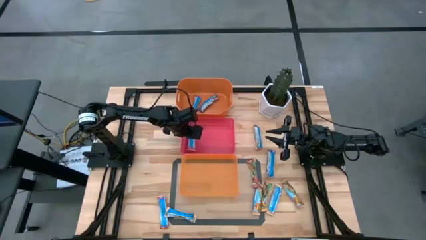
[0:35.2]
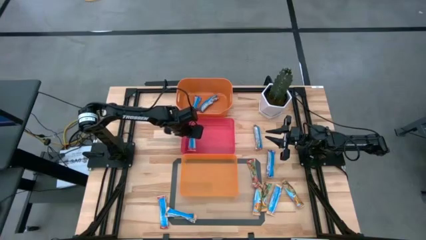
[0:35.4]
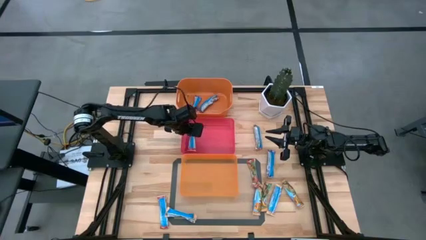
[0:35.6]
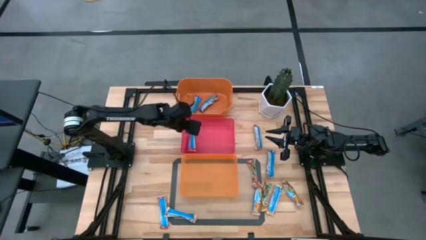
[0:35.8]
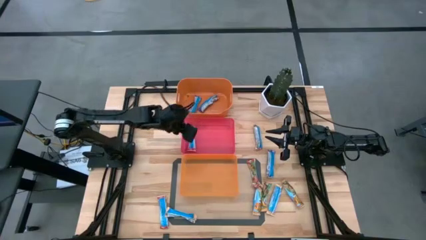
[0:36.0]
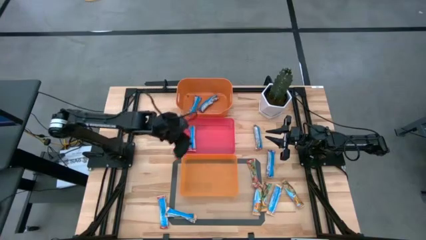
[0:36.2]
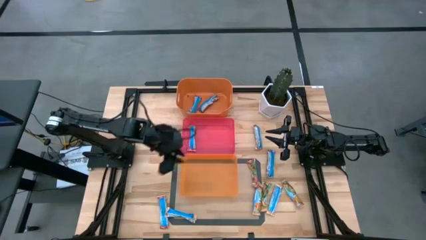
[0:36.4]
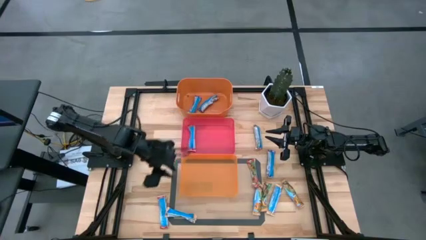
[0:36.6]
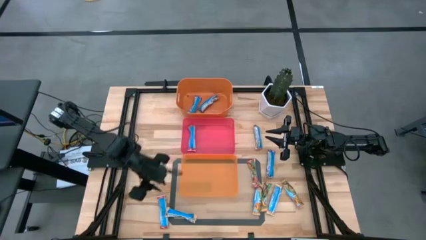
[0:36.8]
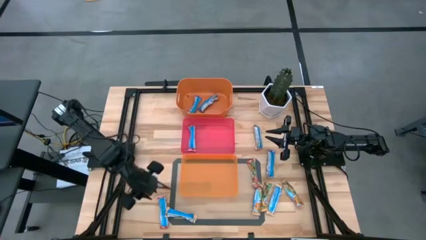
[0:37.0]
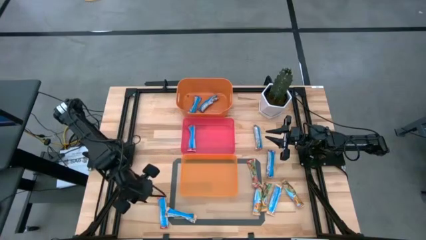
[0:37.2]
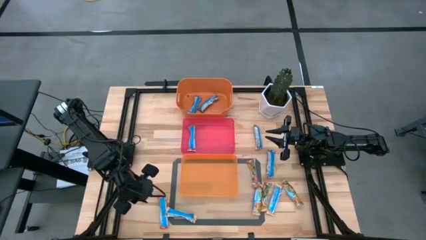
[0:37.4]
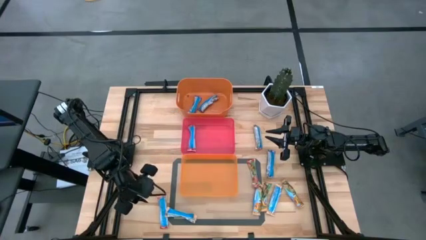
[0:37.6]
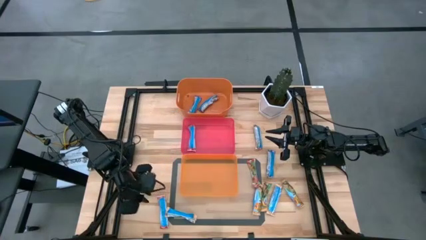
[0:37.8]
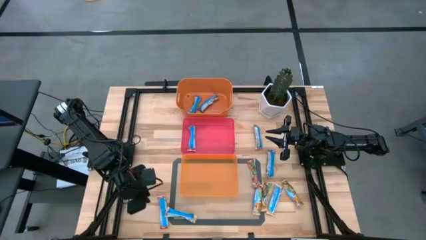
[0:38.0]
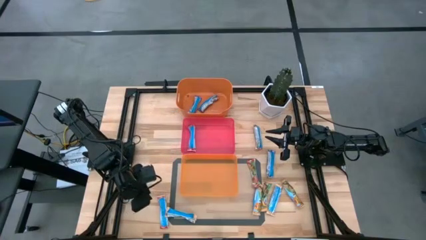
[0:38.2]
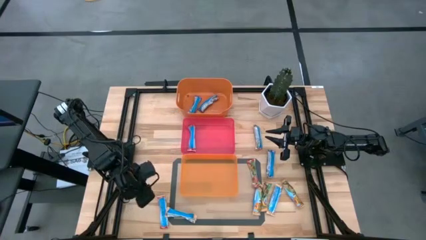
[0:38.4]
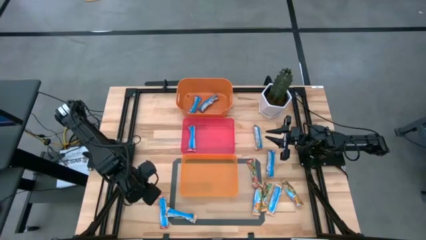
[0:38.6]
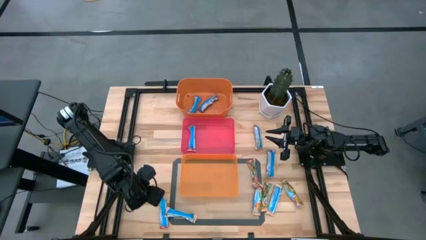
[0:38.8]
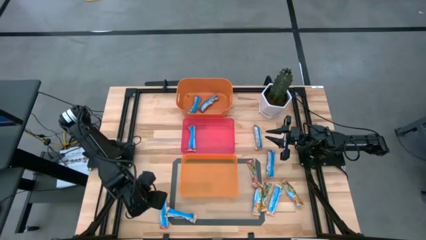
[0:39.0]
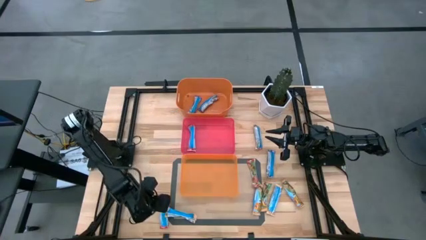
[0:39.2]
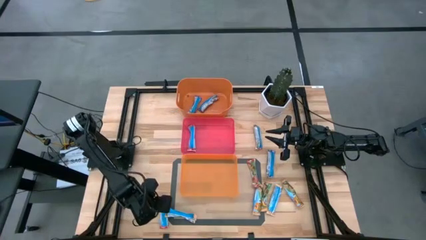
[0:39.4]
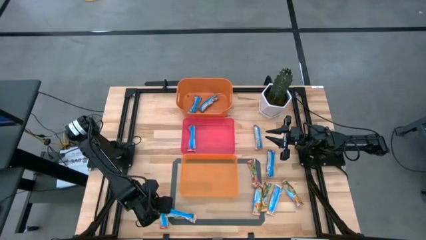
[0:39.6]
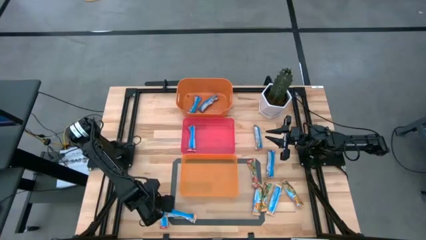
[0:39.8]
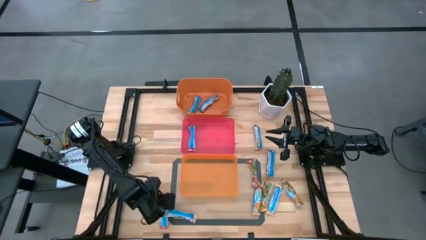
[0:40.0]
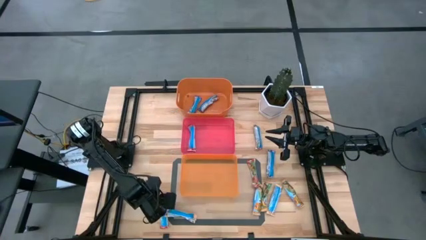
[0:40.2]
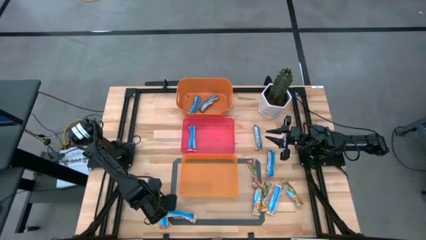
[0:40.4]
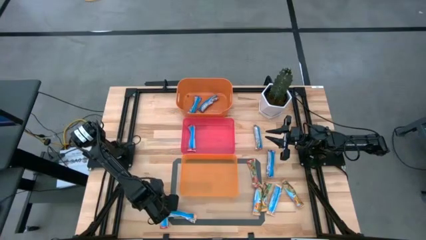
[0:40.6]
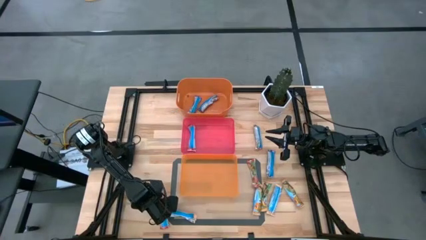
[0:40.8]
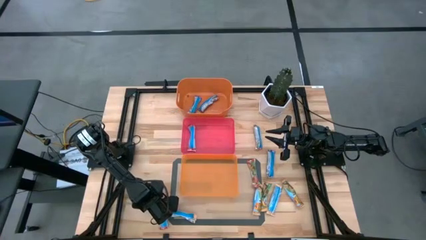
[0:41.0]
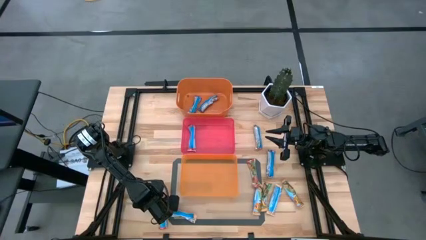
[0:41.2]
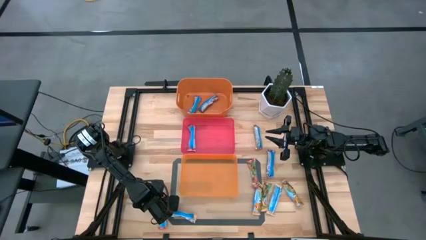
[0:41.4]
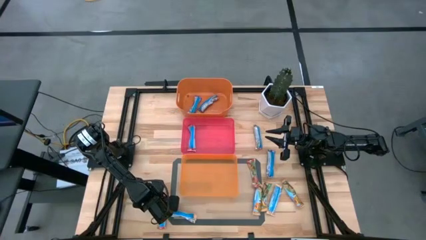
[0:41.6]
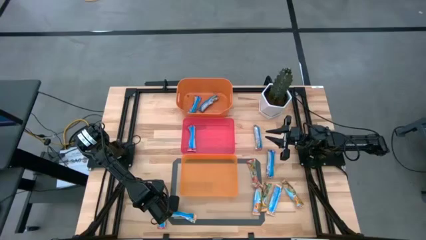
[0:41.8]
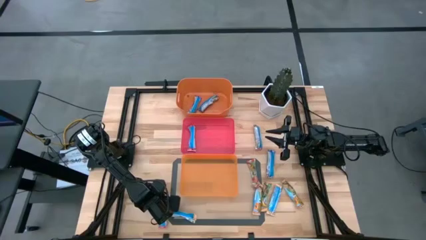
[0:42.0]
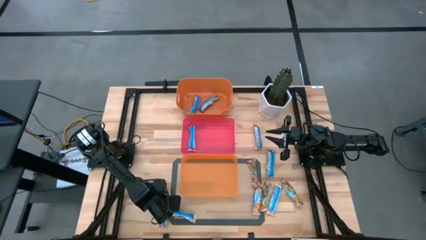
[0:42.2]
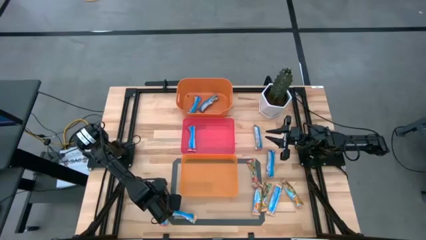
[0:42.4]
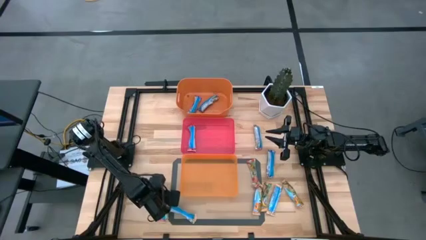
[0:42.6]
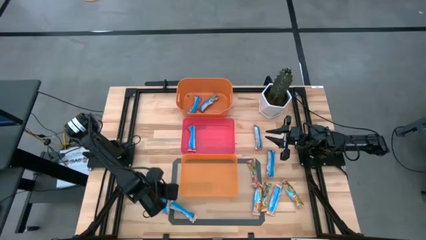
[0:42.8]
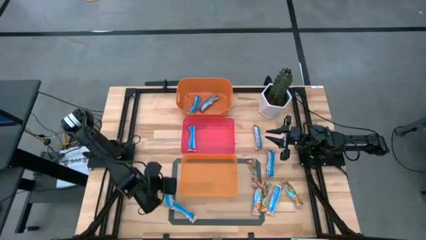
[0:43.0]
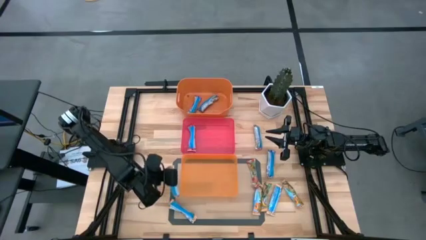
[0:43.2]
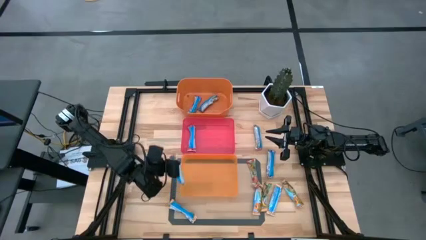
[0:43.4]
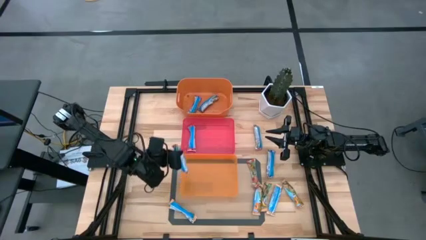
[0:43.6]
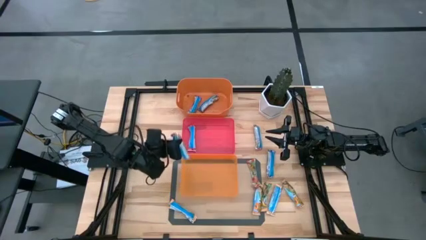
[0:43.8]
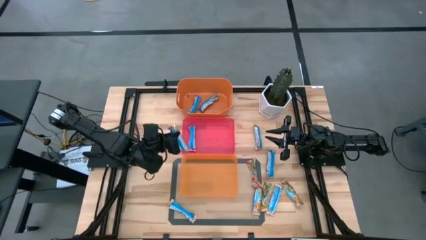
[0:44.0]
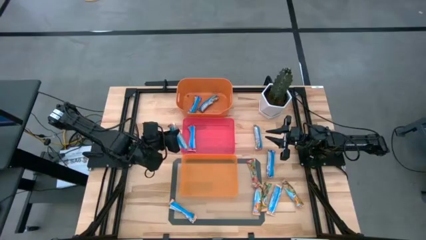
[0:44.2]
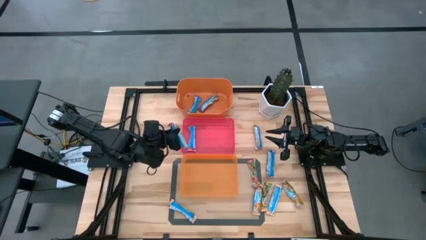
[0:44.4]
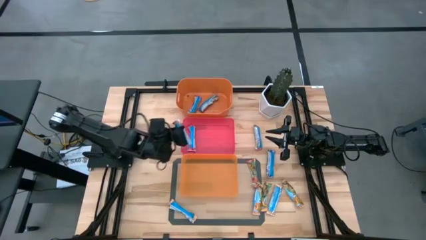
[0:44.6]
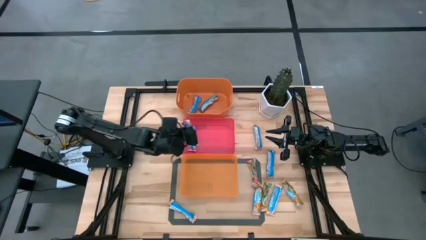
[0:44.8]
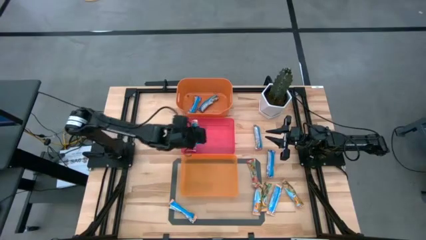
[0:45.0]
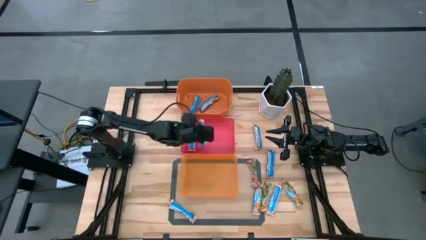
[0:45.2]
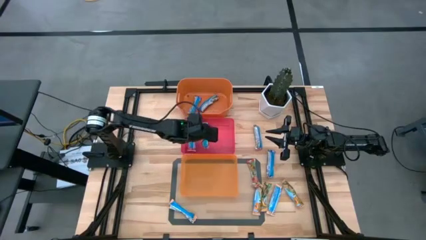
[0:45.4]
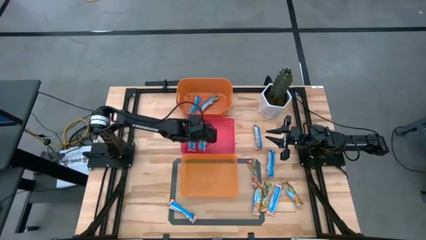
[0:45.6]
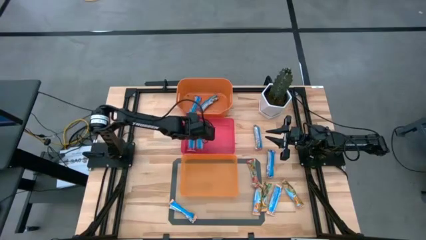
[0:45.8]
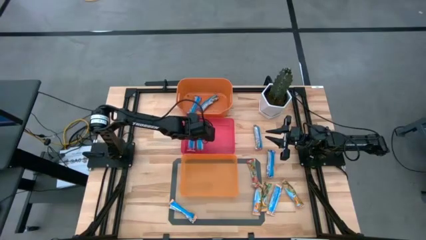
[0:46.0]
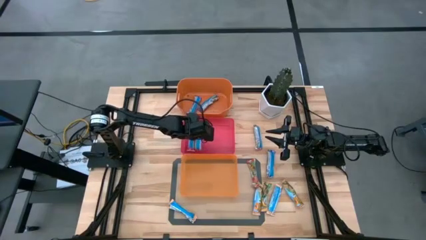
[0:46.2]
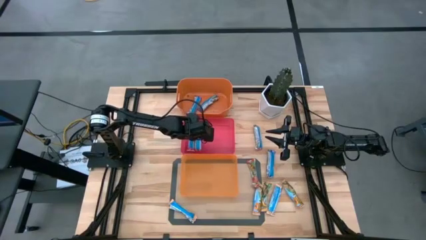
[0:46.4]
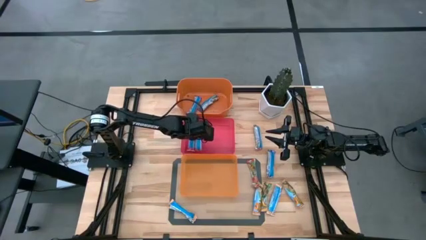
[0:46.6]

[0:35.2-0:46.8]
Task: Pick and place Granola Bars by type
Put the red granola bar into the red bin

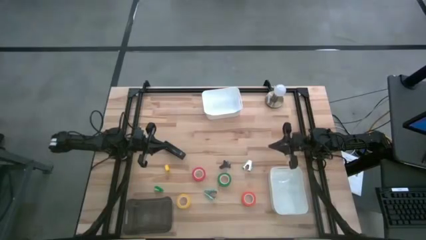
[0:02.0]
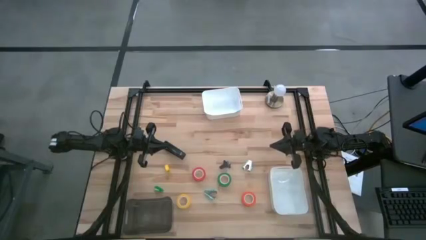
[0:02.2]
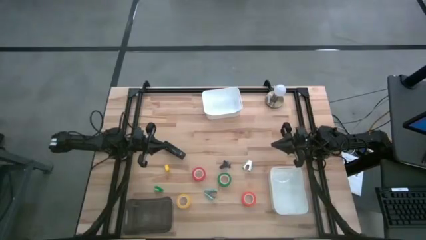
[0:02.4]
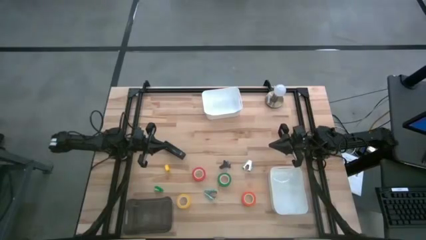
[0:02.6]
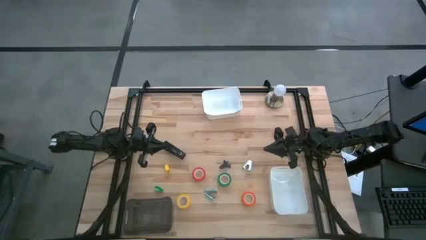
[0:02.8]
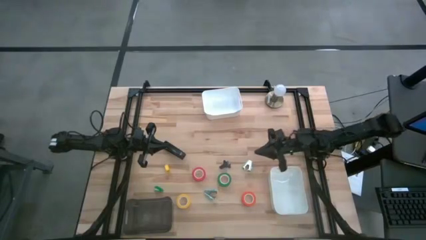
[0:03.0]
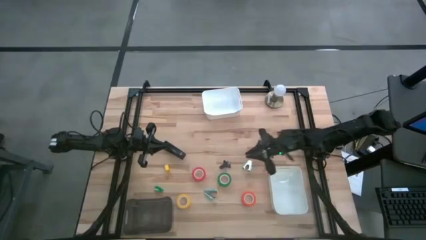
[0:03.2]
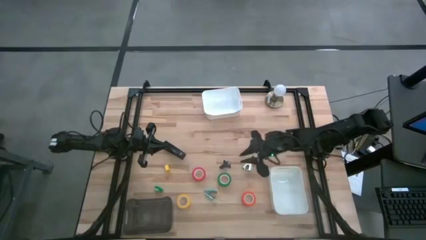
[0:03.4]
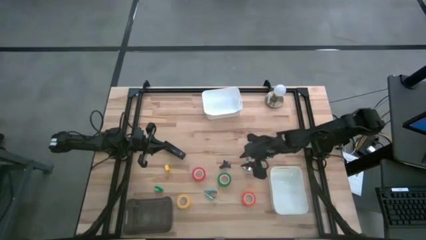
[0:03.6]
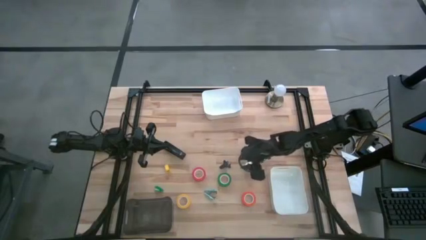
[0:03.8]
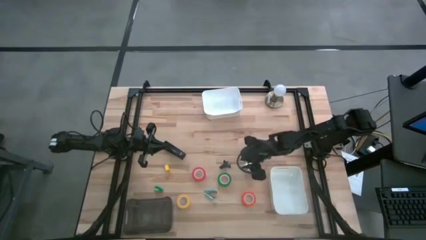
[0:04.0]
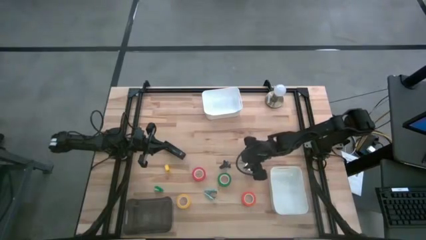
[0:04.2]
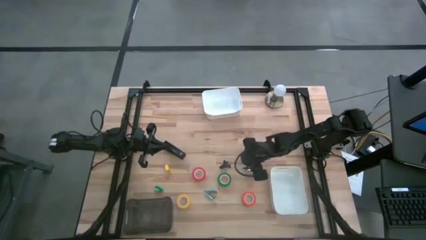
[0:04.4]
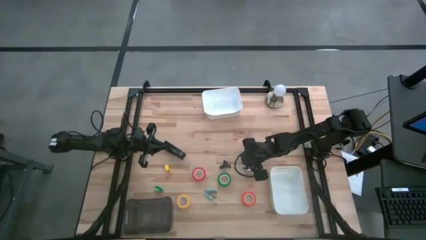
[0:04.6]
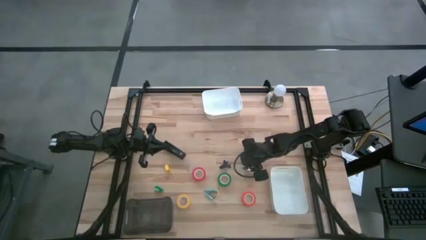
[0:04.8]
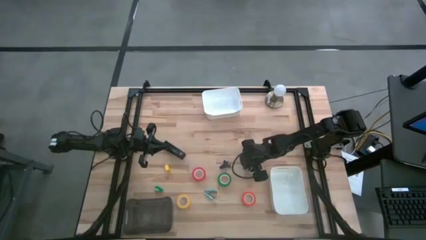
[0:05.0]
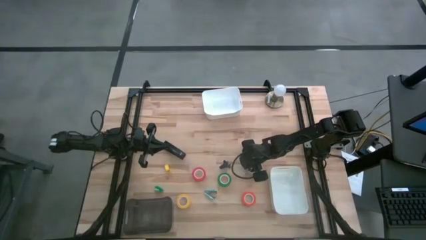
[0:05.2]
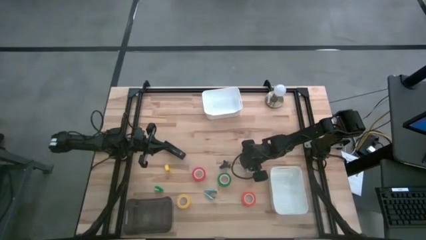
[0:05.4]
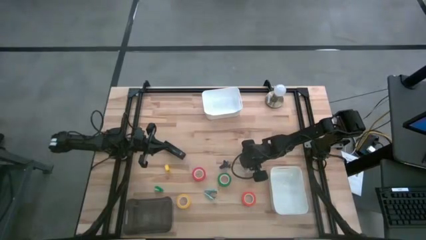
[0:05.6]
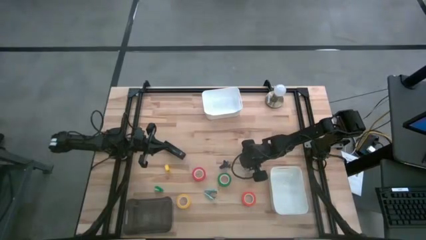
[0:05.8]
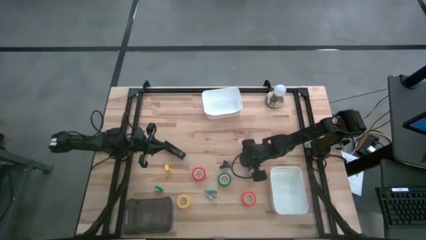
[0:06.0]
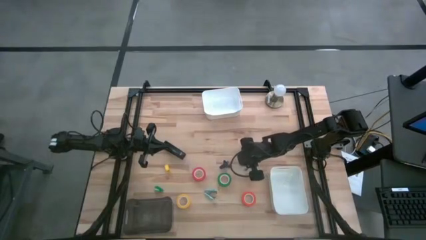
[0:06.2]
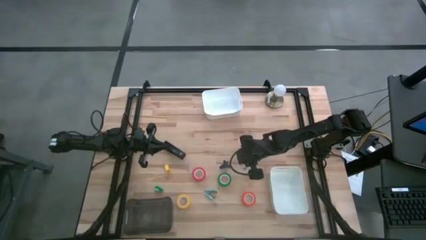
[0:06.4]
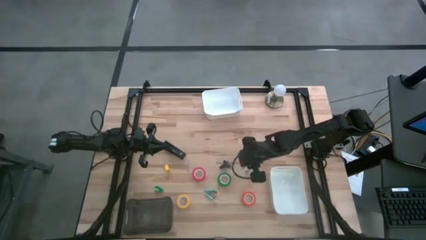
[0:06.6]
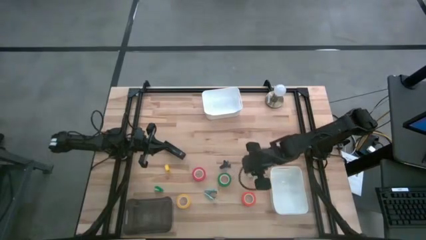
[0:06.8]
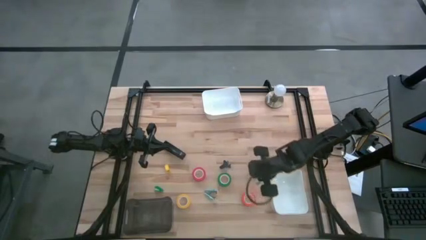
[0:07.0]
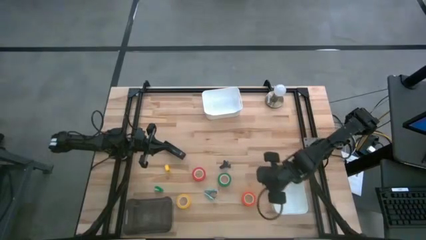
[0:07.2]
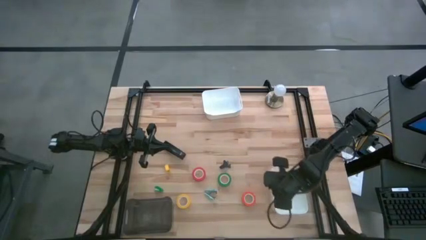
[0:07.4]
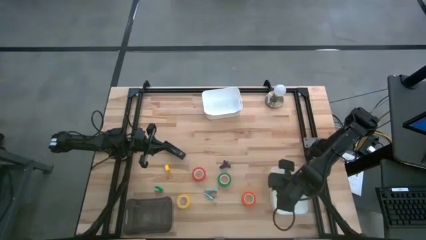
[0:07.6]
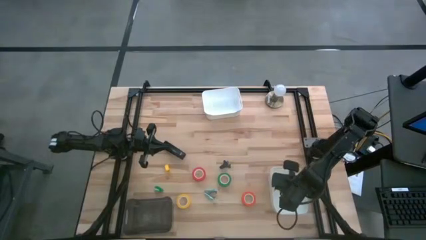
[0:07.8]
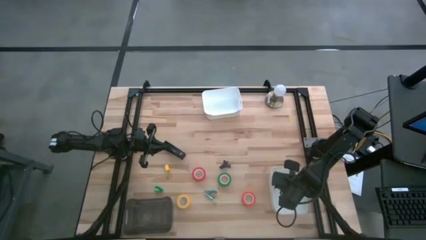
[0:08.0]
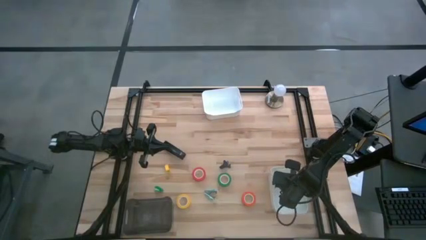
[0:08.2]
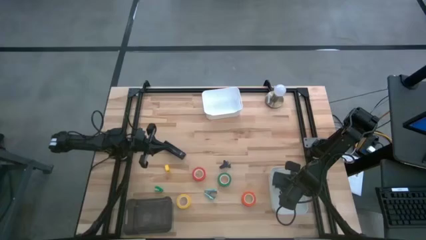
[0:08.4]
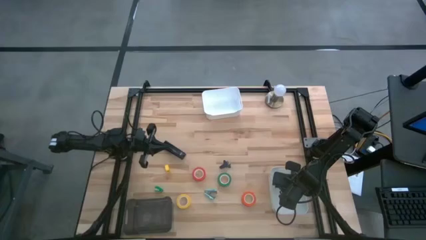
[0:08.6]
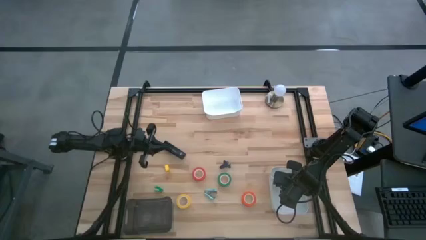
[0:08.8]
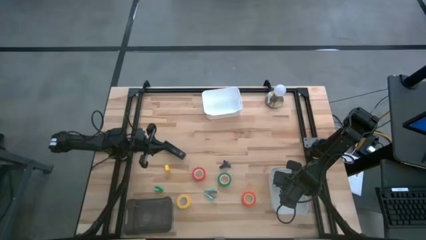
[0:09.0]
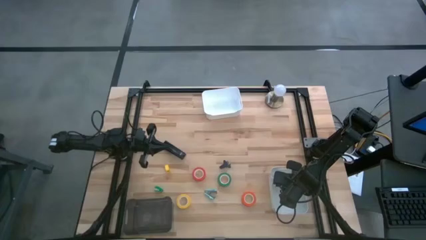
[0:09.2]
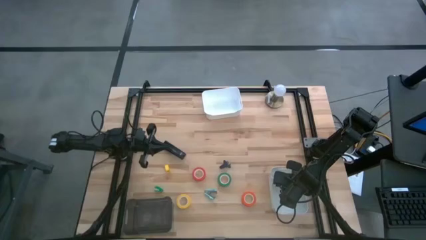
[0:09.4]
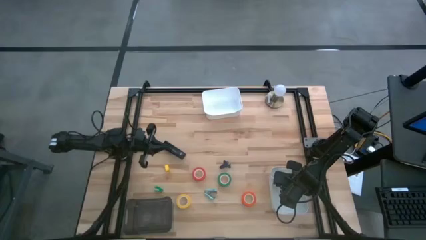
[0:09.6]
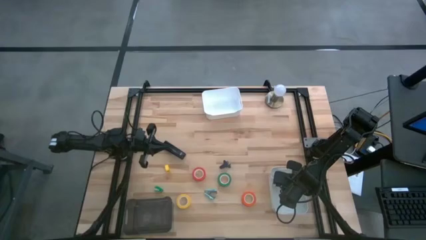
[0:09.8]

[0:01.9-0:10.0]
Task: Pick and place Stapler, Stapler remover, tape
Put the light blue staple remover into the bottom white bin
